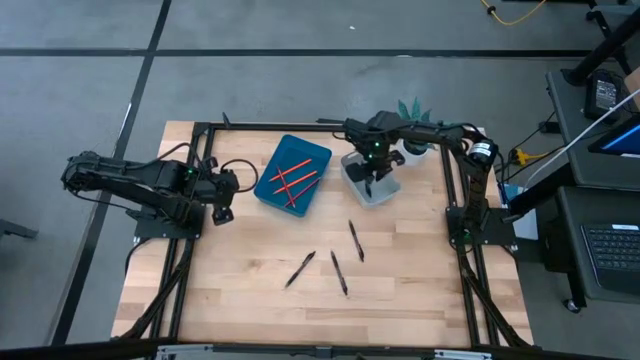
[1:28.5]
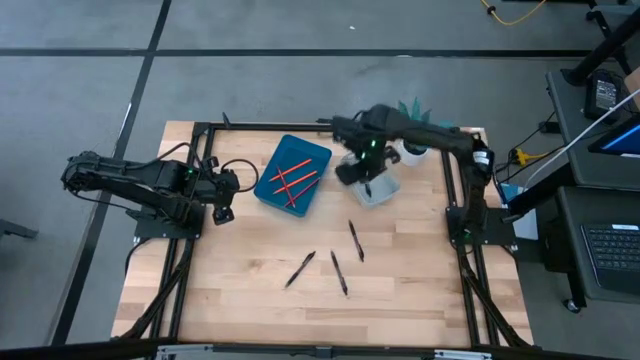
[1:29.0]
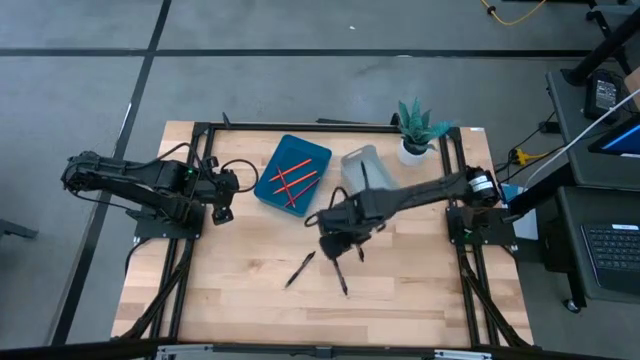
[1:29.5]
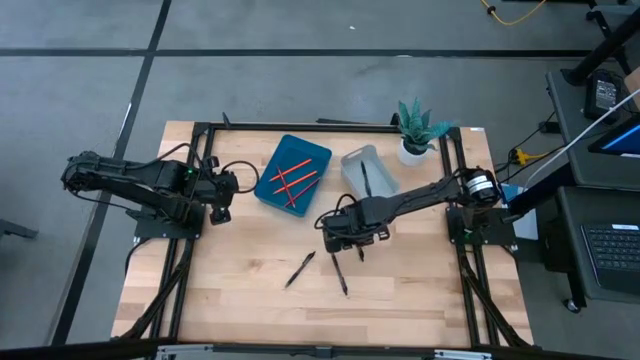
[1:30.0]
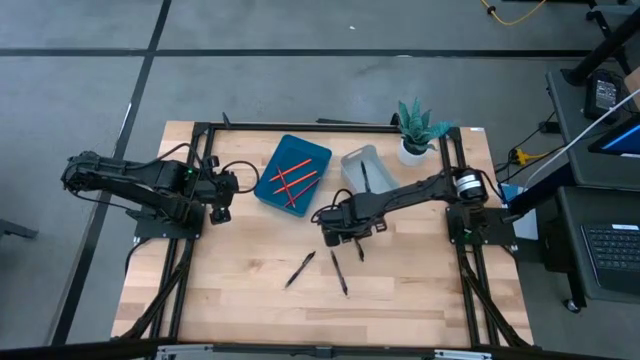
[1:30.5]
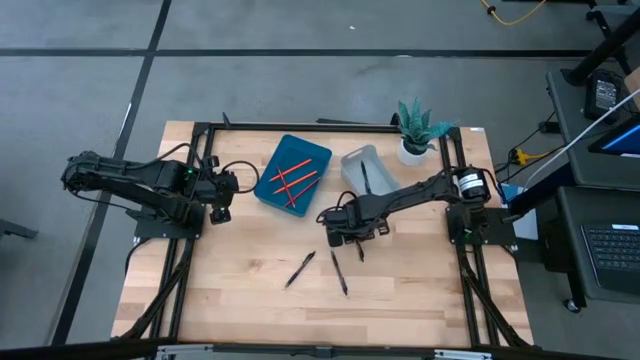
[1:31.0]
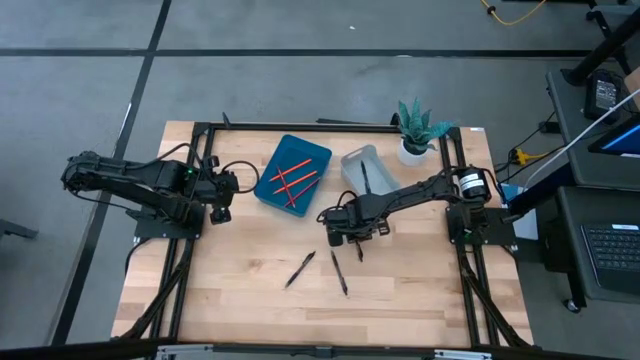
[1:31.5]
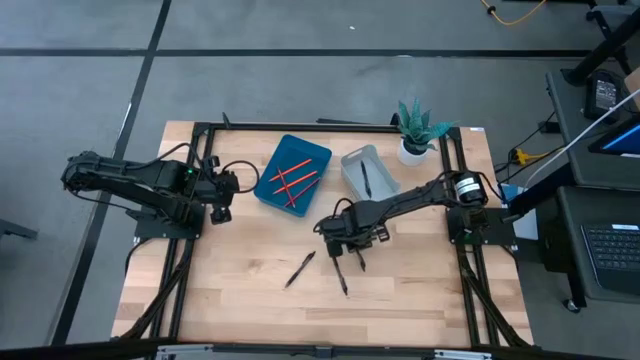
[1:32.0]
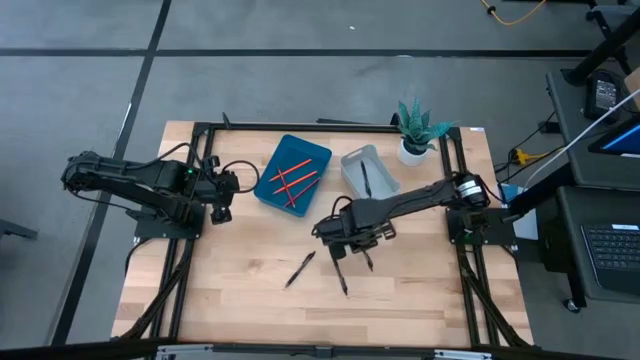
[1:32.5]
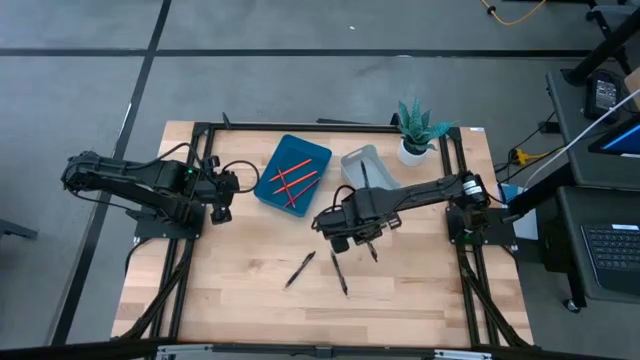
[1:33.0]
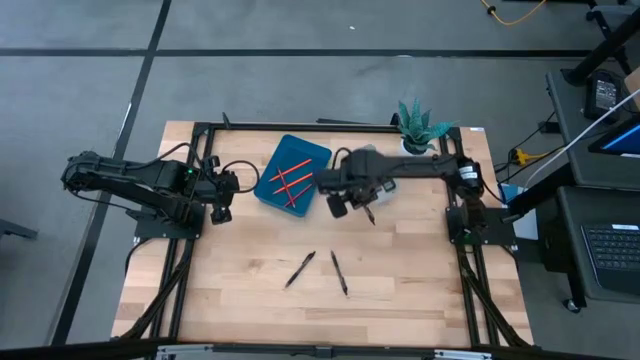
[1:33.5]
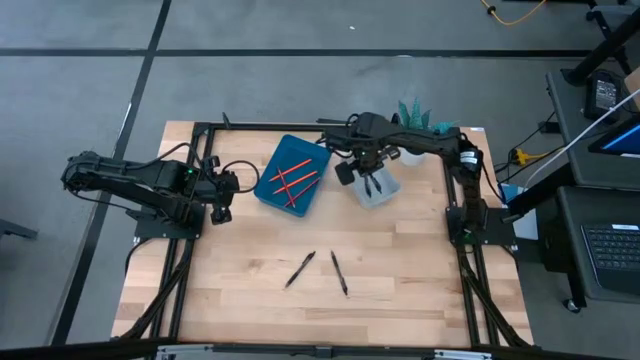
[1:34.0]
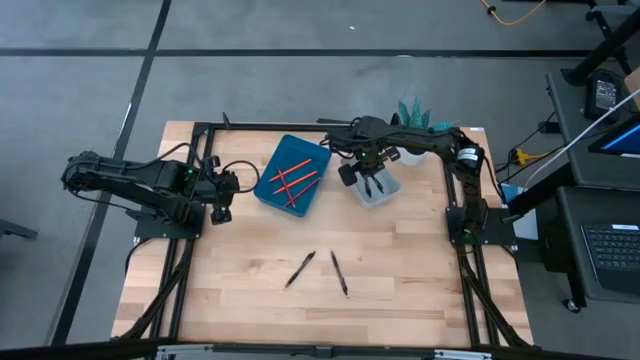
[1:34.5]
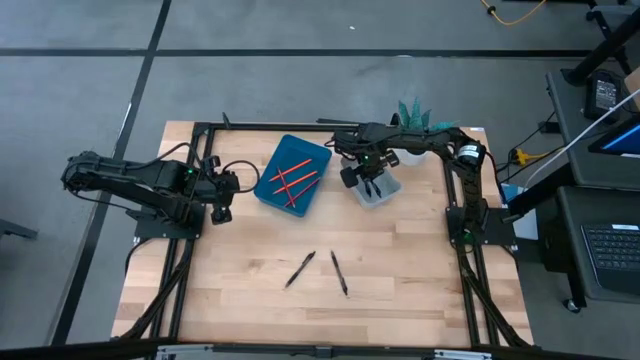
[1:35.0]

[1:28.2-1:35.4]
Task: Sort pens & pencils
Put the black pen into the gray bin

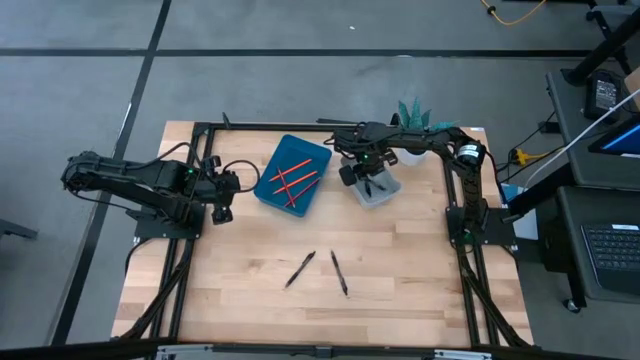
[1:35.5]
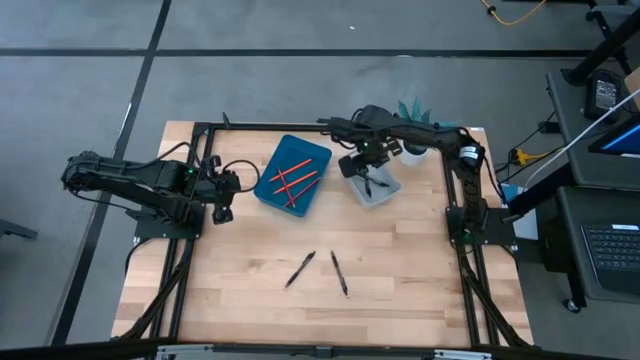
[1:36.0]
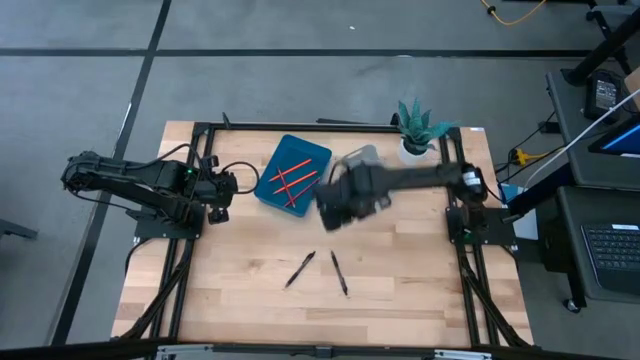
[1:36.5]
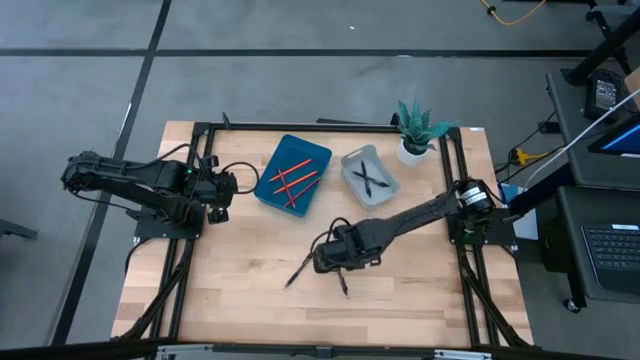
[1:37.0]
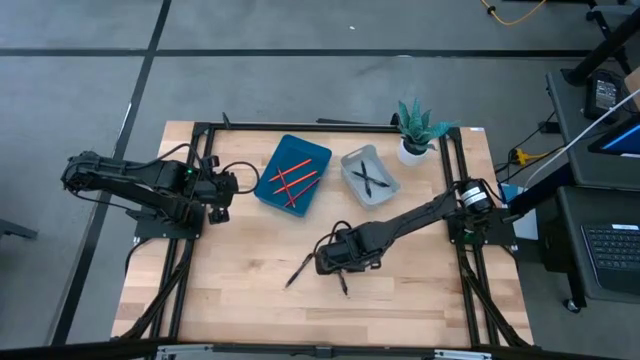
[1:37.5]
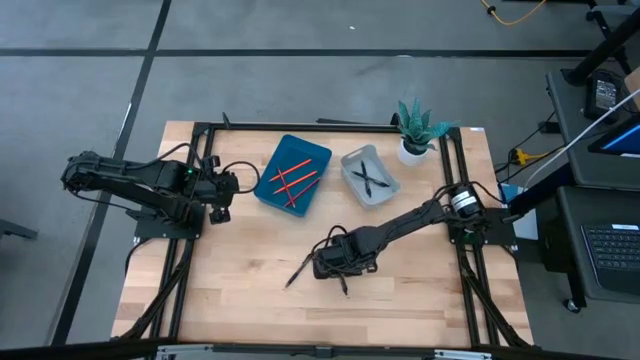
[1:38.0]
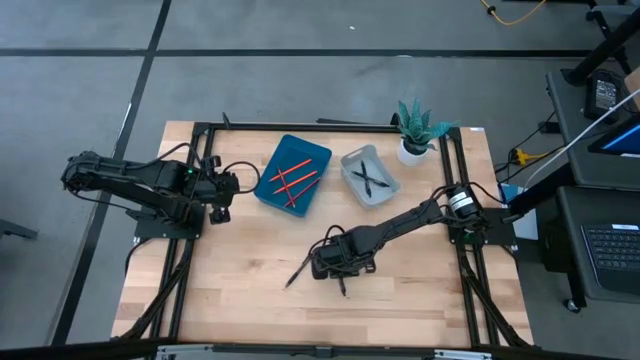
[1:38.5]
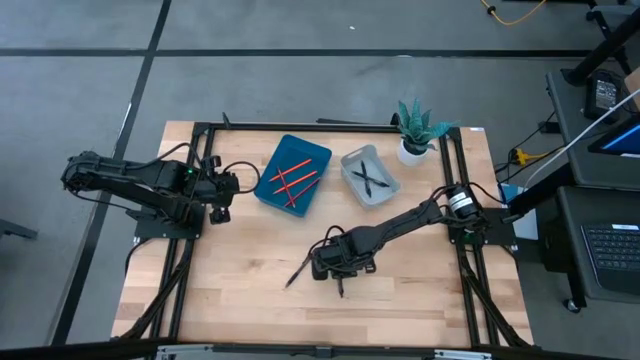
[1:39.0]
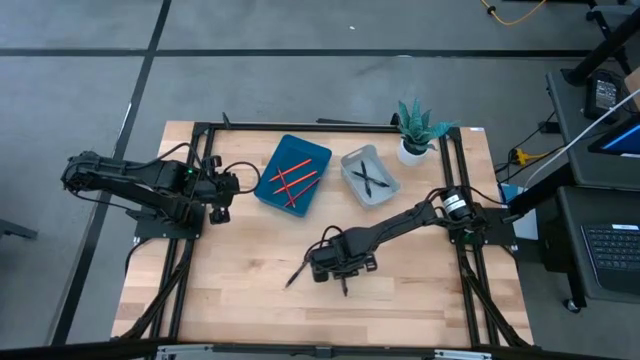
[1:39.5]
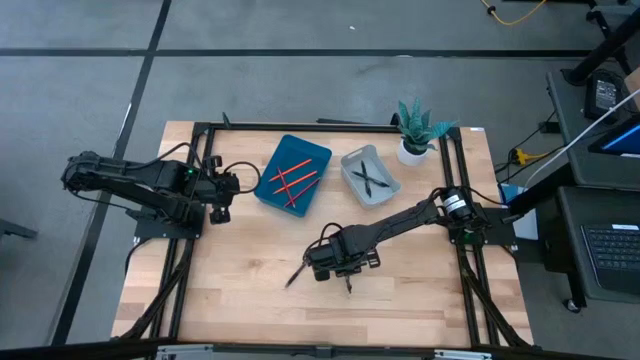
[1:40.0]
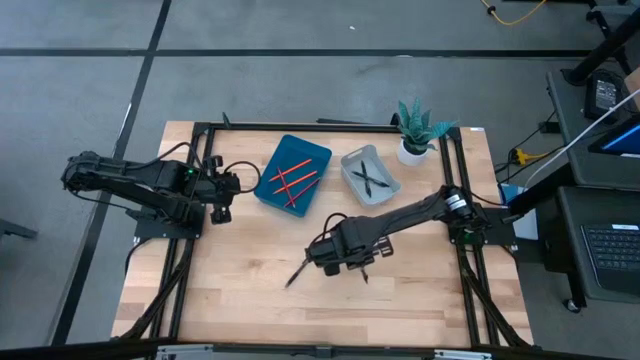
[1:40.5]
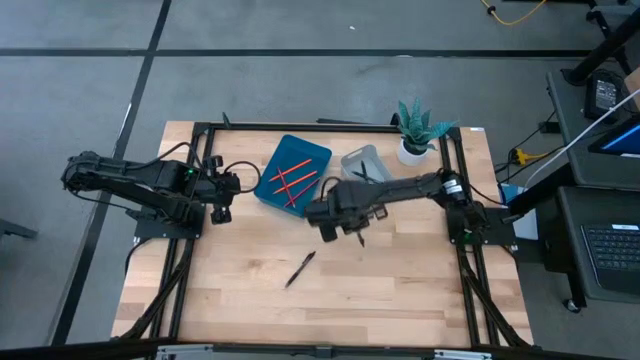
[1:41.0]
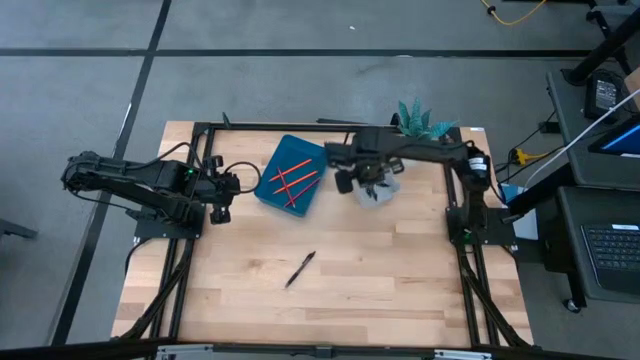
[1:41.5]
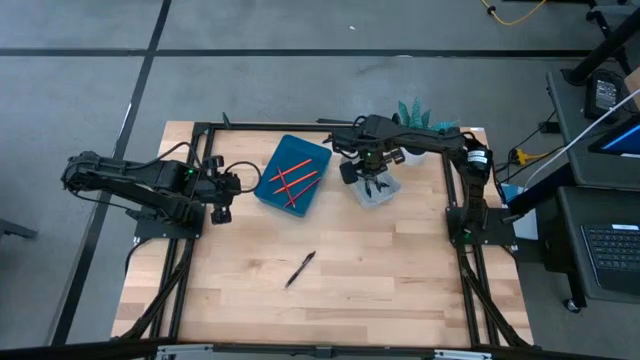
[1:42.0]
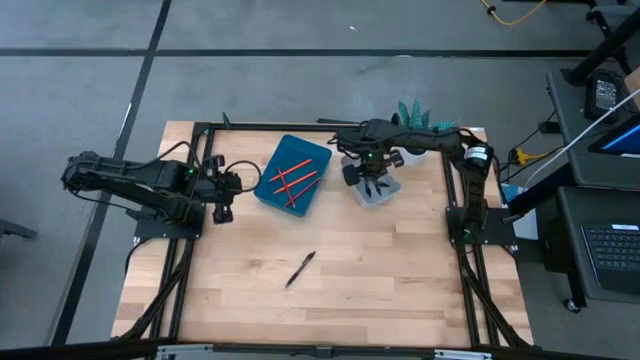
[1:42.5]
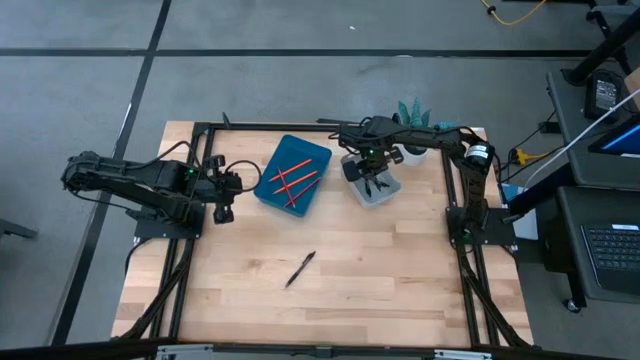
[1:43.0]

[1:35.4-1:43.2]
Put the black pen into the gray bin

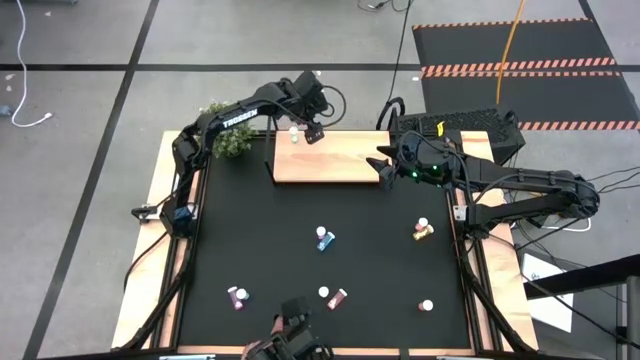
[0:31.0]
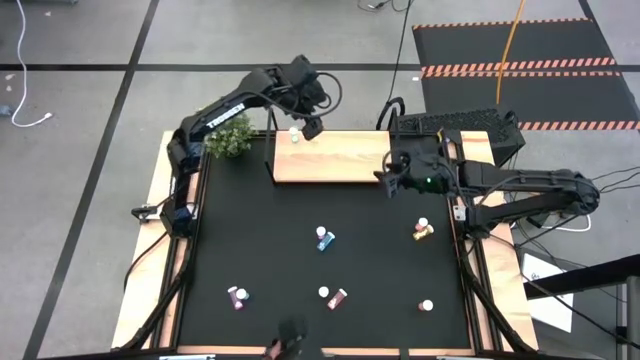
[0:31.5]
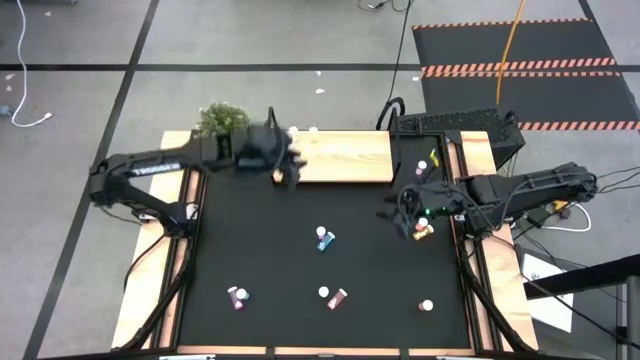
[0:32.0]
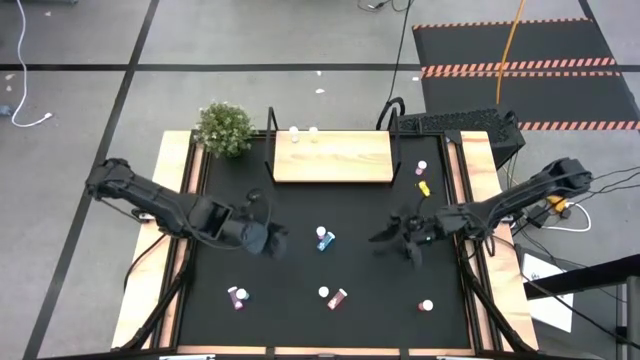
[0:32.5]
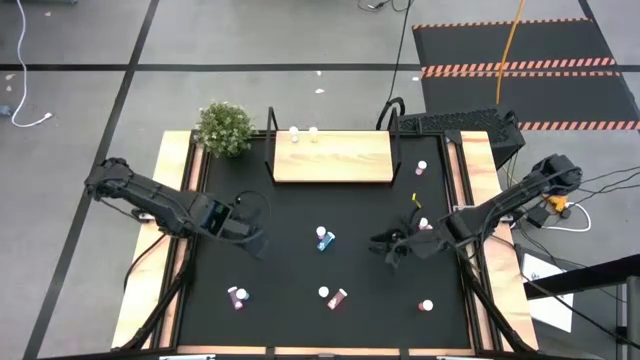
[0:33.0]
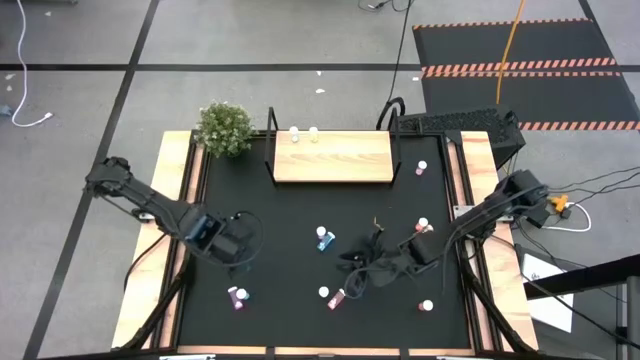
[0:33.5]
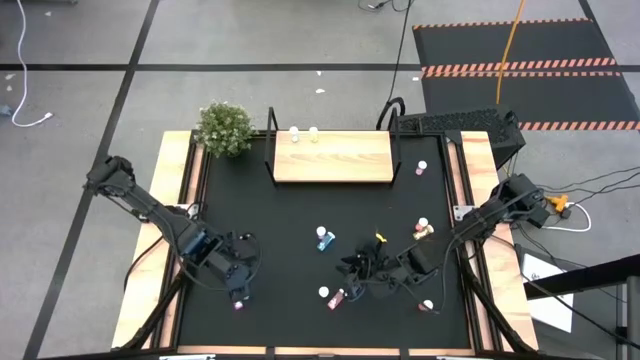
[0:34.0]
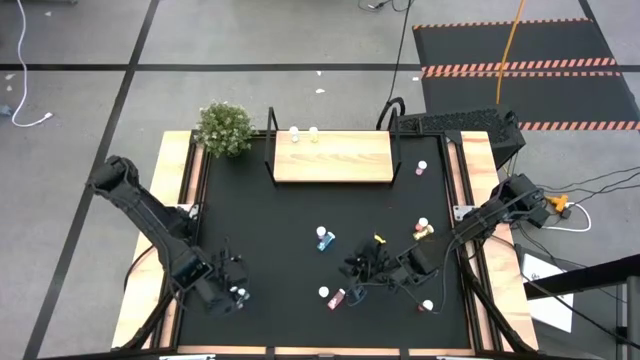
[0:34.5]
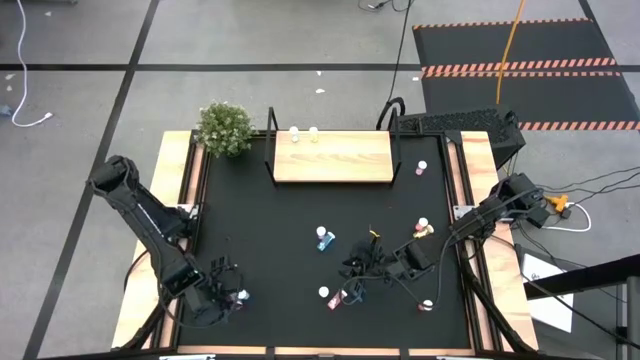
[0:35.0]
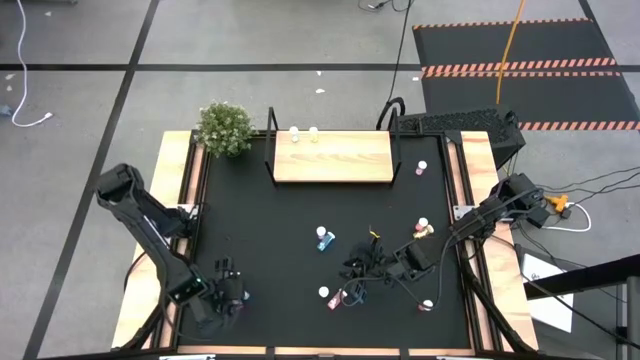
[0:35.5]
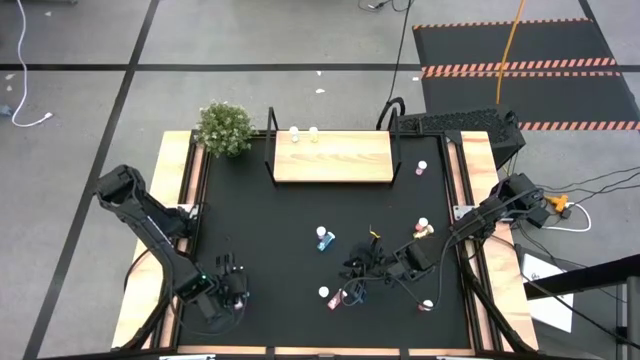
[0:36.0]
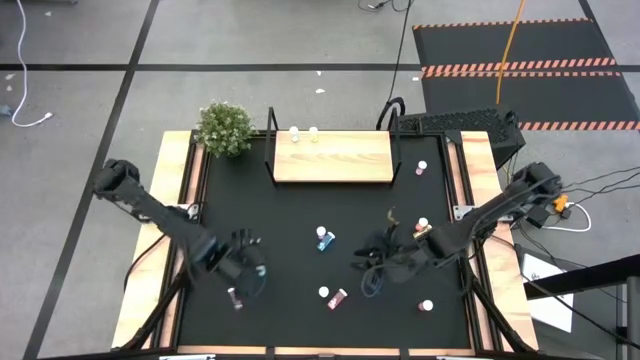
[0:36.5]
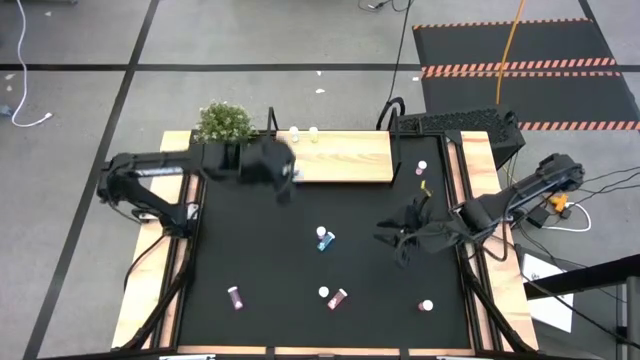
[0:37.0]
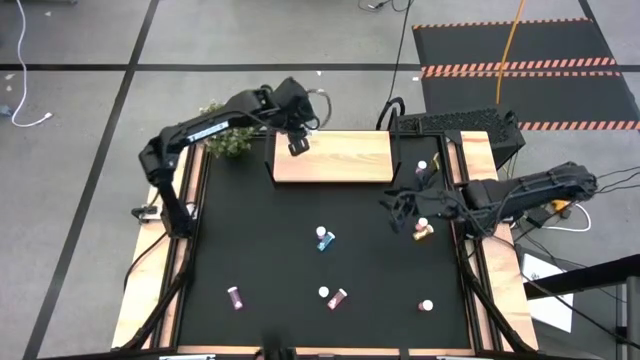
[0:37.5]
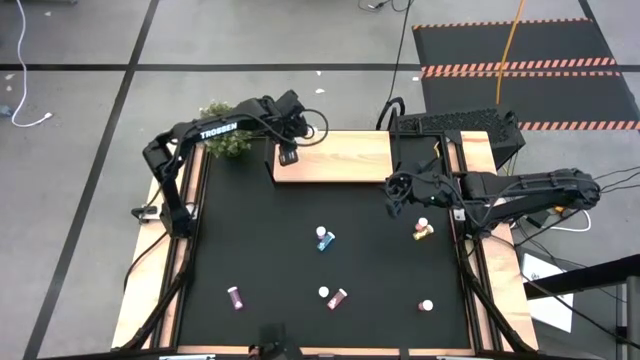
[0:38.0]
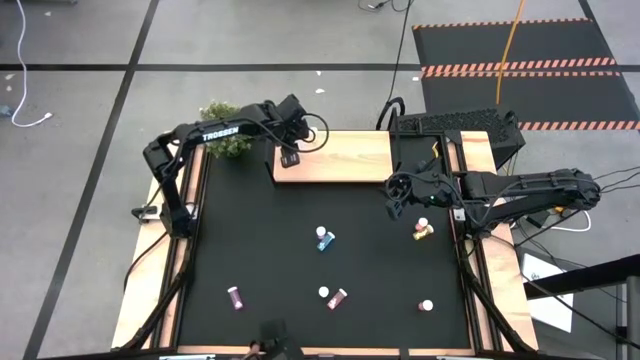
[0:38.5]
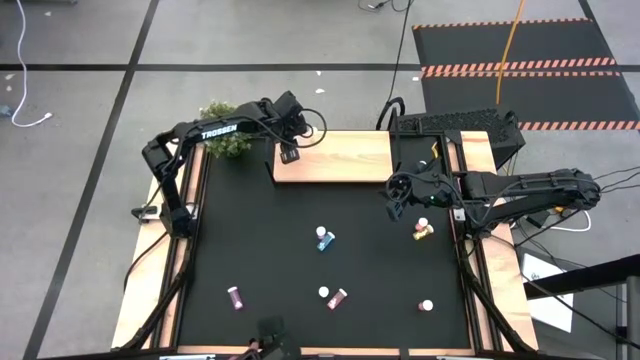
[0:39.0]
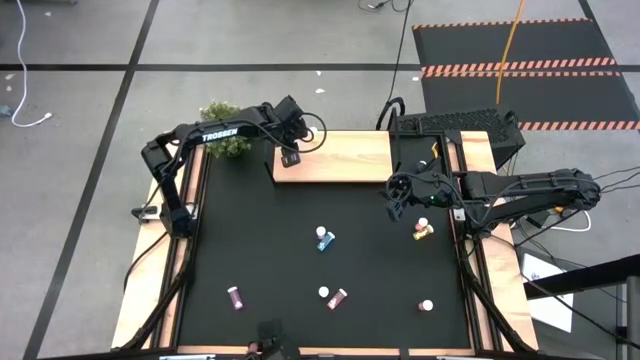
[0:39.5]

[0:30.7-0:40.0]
Task: Pick and place medicine bottles onto shelf by color
Put the bottom blue pill bottle on the shelf
